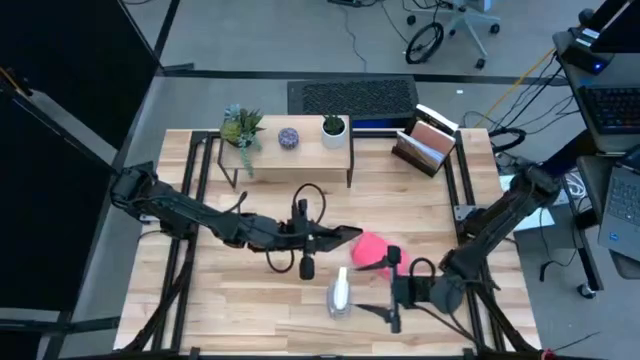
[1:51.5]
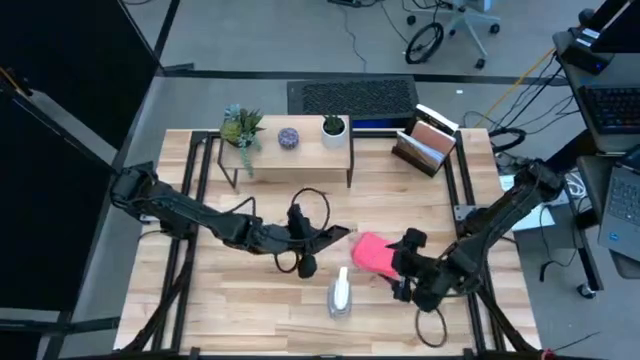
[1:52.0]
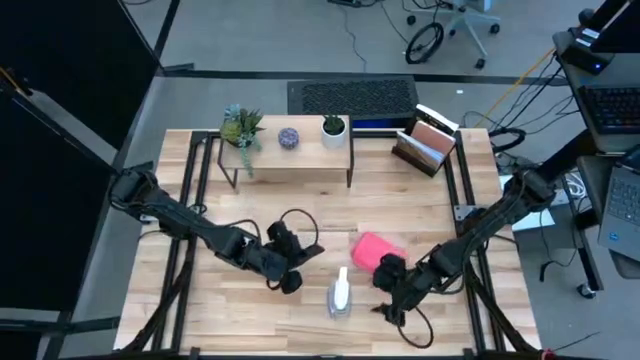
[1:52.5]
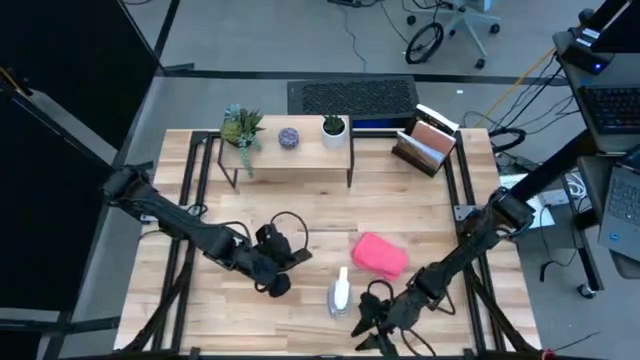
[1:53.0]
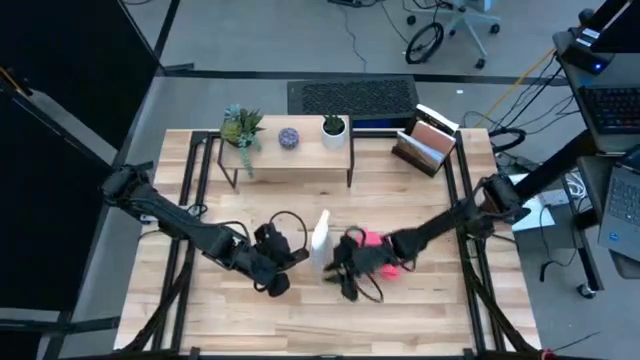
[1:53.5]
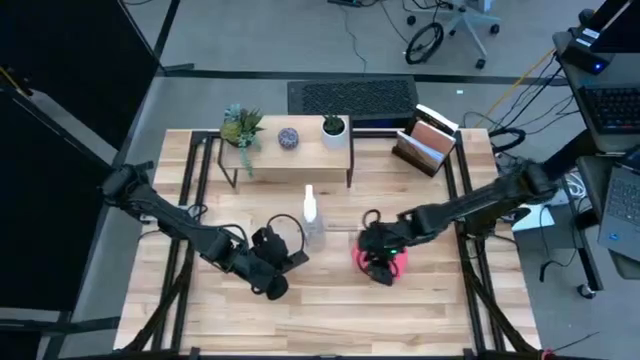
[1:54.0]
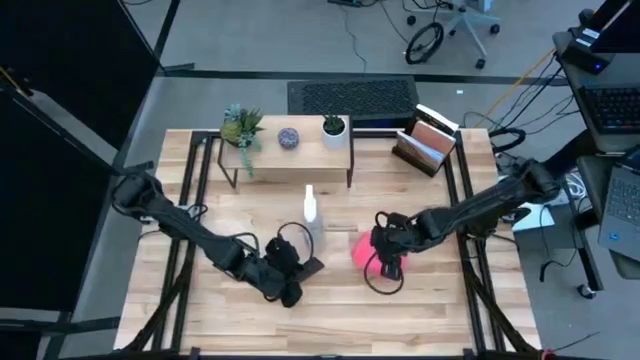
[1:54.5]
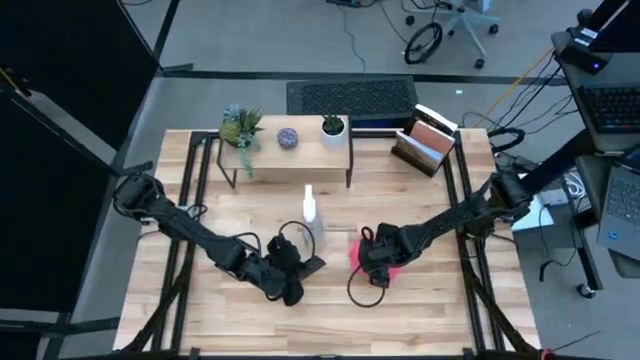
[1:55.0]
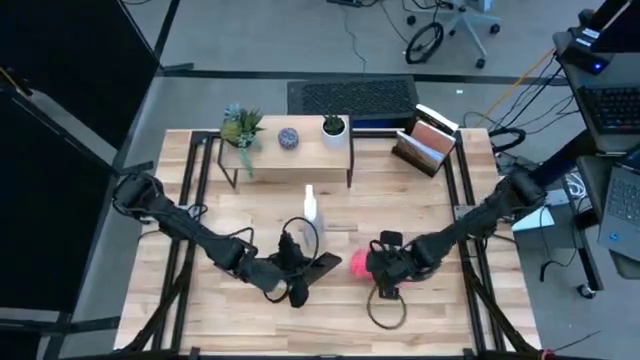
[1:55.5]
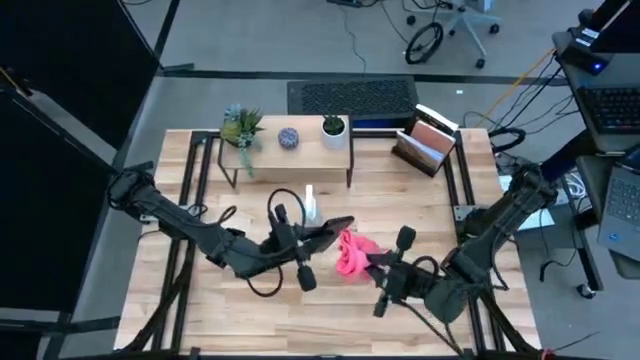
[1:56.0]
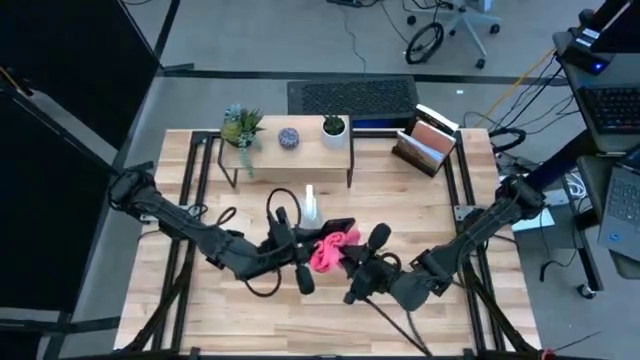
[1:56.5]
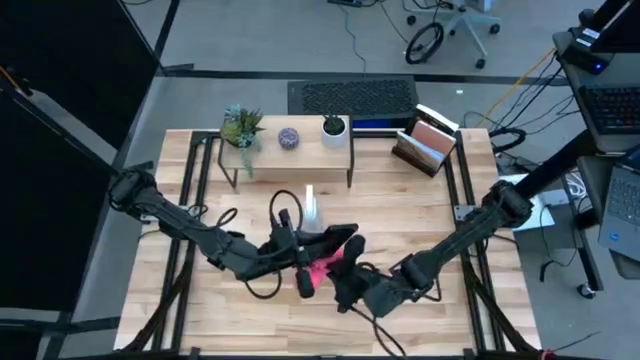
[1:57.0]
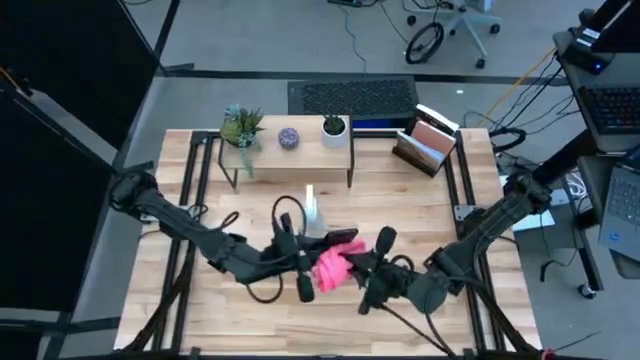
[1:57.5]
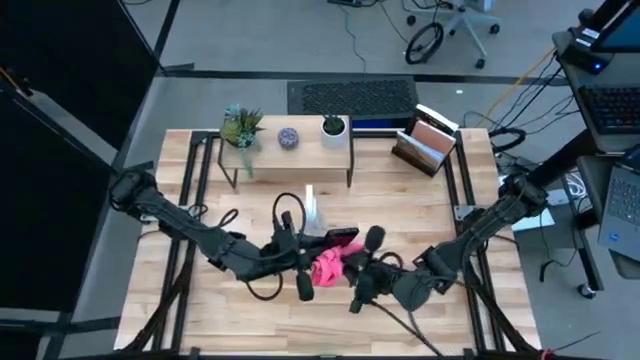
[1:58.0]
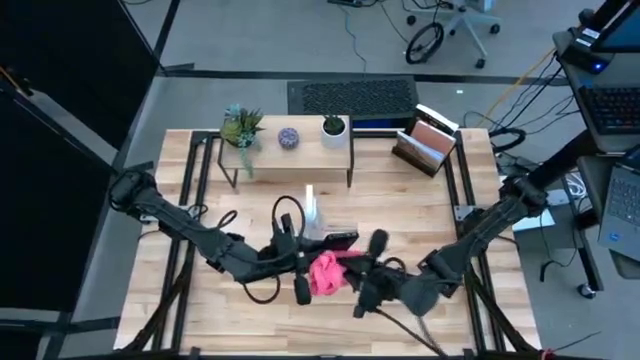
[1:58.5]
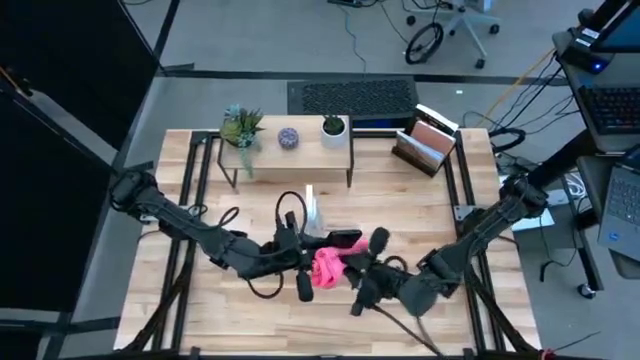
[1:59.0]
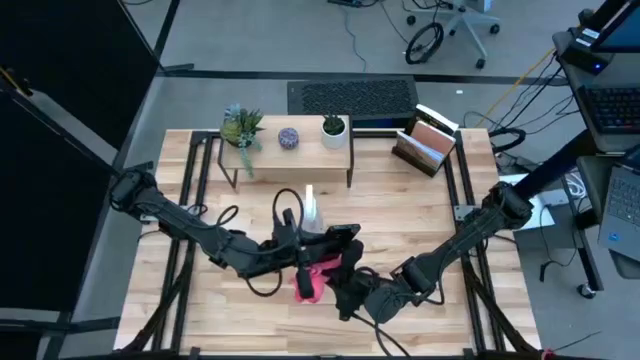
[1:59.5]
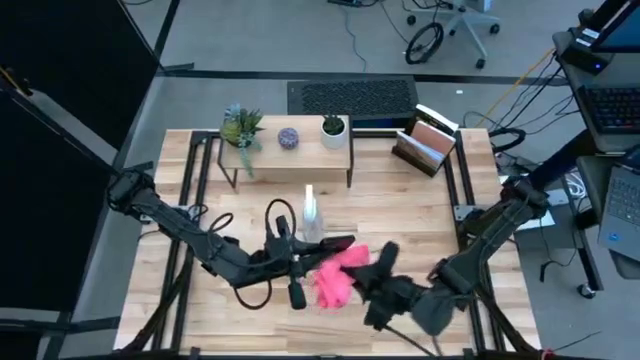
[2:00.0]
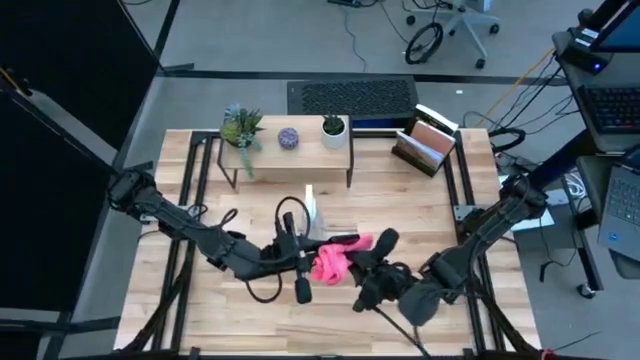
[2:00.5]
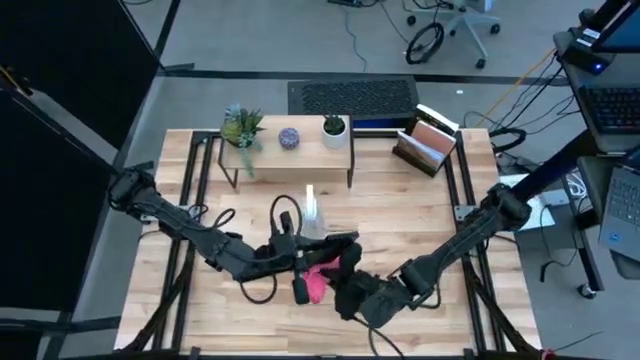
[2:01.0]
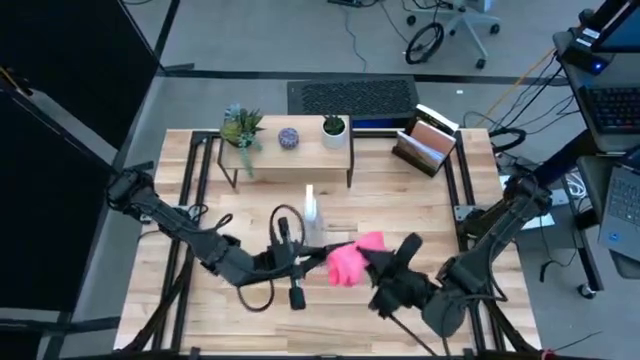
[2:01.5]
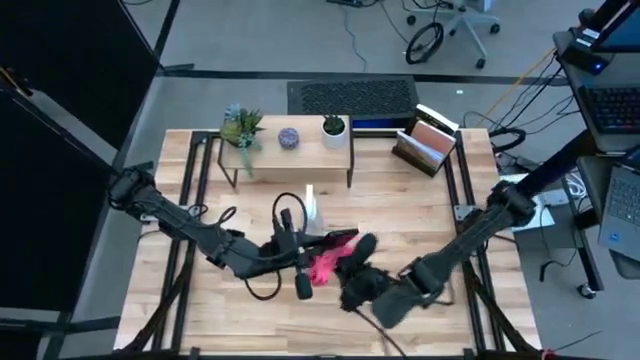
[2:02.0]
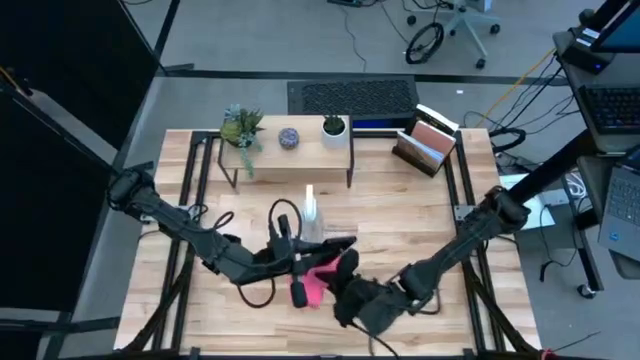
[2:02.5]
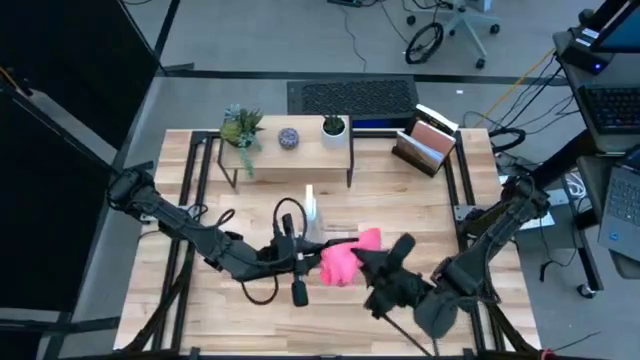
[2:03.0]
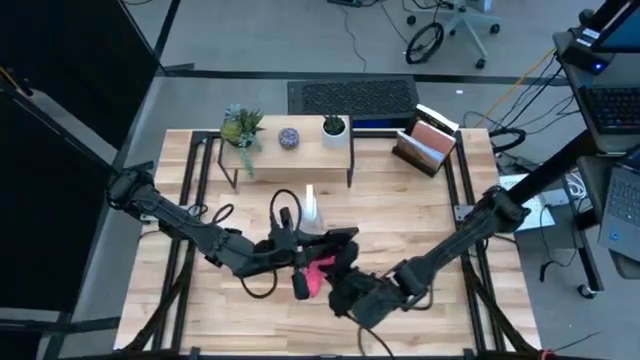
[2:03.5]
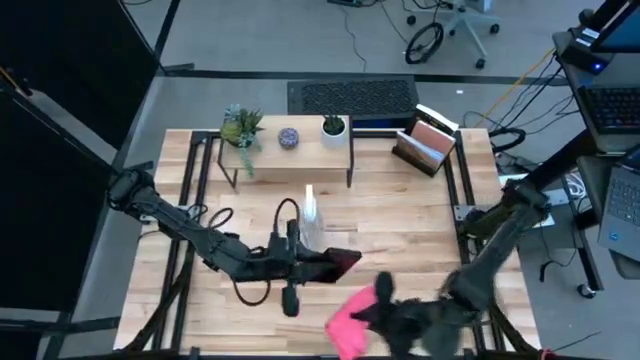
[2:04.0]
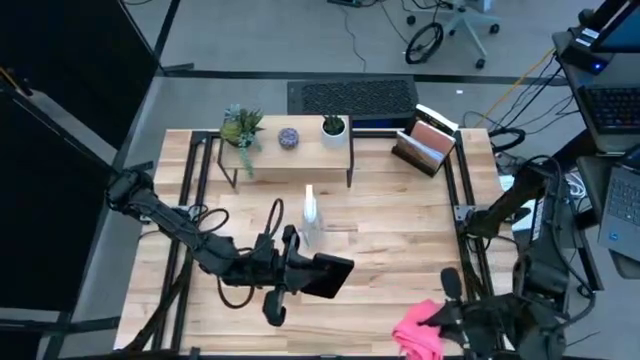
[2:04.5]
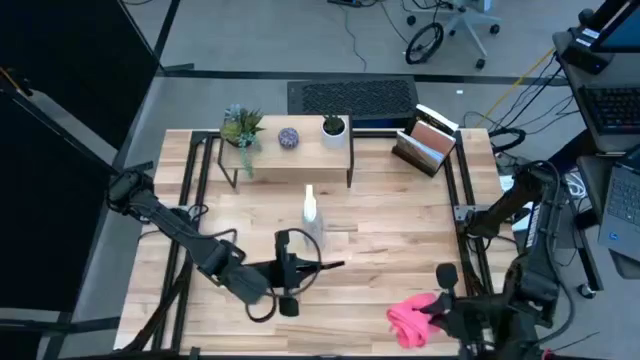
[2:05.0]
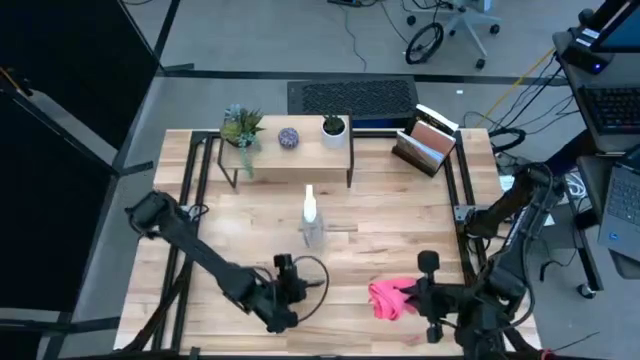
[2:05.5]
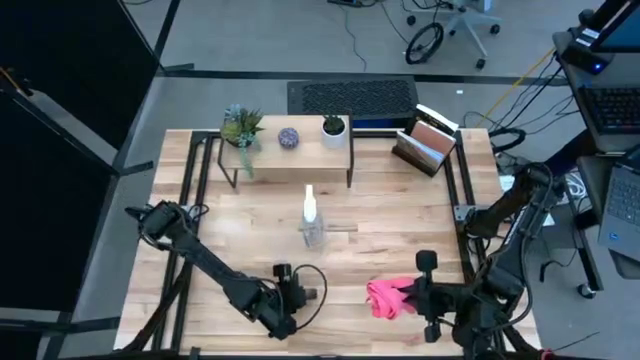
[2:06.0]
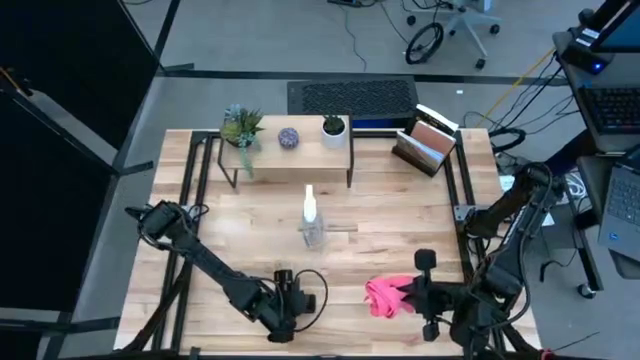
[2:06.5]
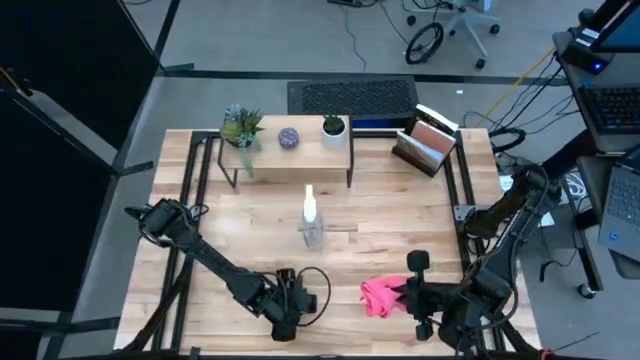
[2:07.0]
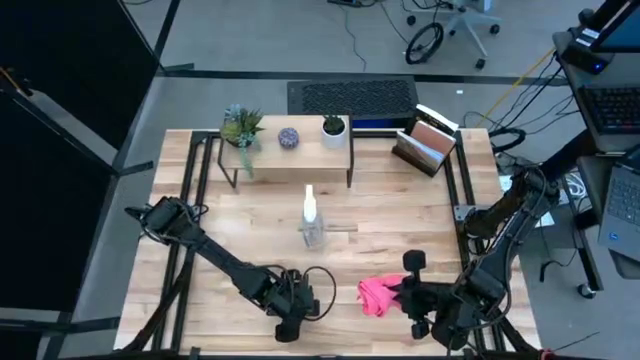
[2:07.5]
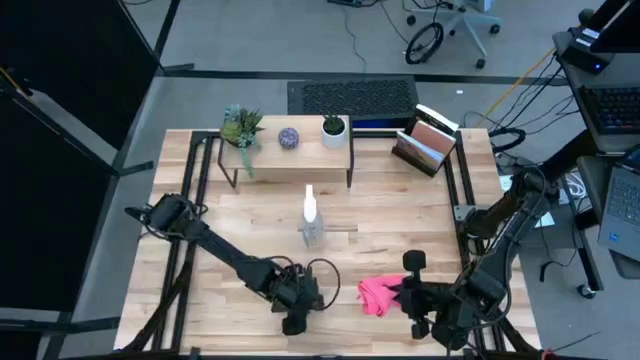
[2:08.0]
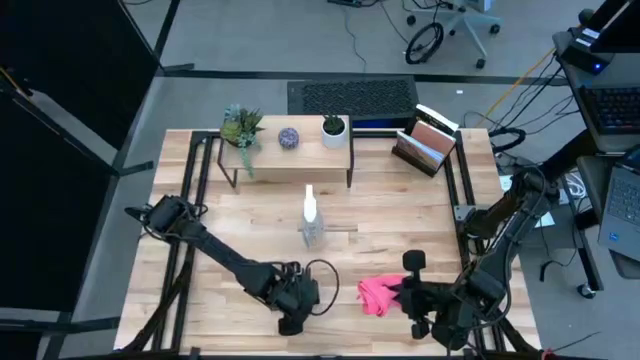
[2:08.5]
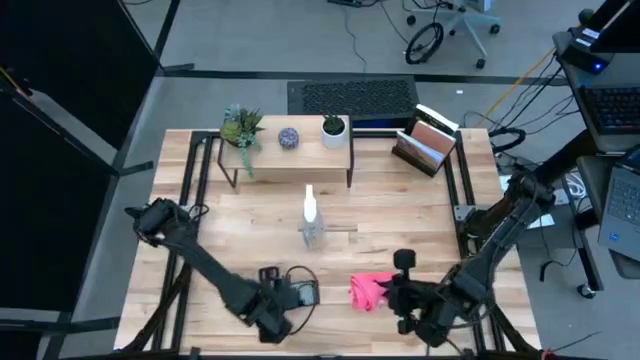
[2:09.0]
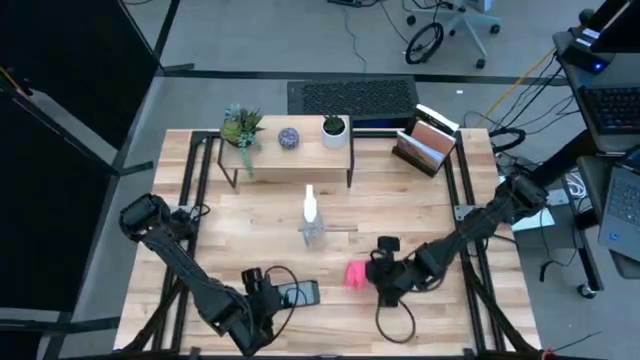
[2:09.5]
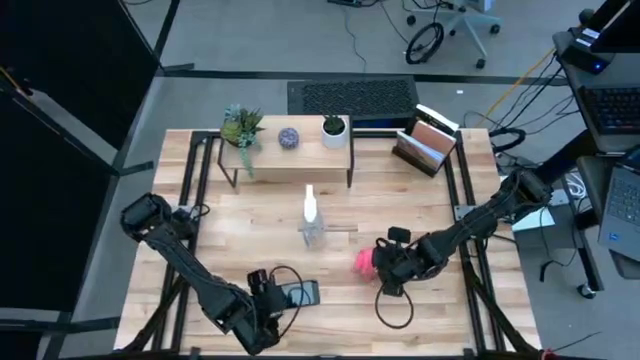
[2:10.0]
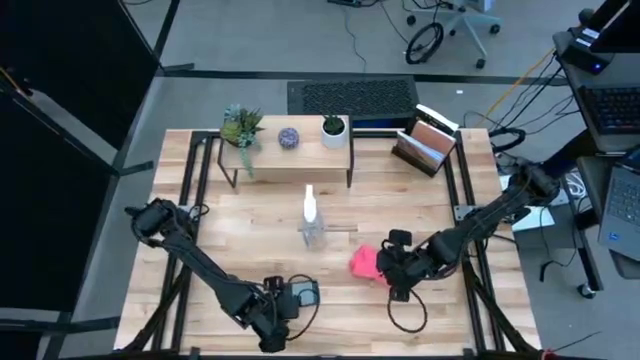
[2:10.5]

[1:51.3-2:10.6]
Task: Apply microfiber cloth
Wipe the back of the cellphone using the pink microfiber cloth

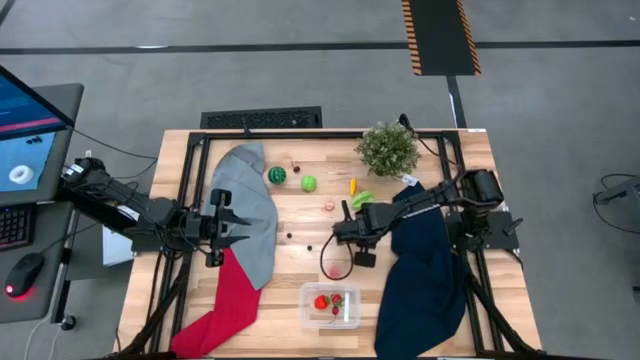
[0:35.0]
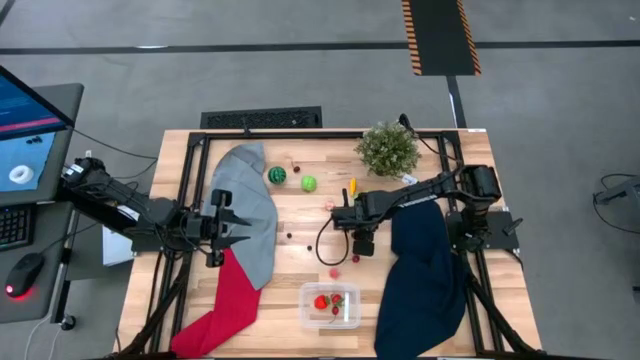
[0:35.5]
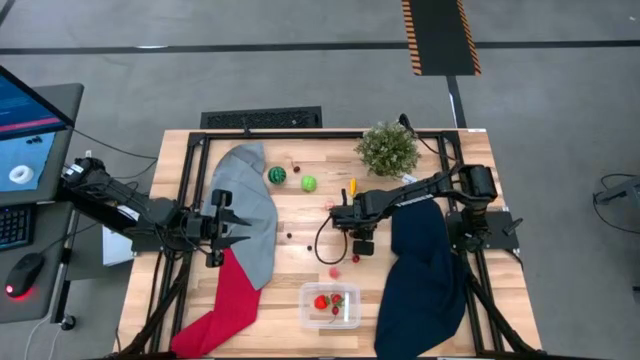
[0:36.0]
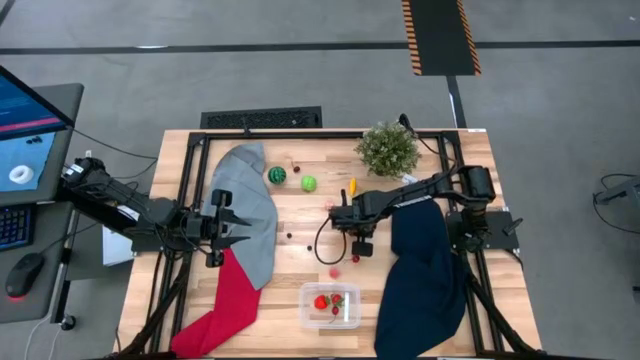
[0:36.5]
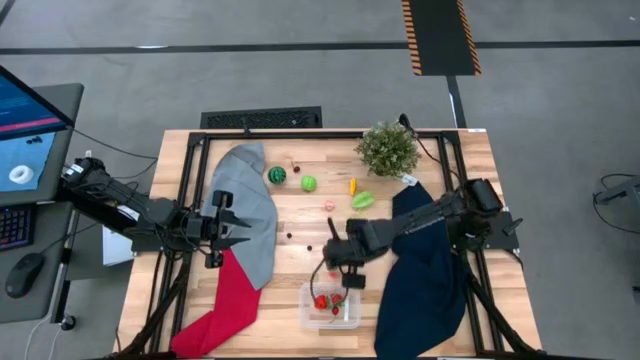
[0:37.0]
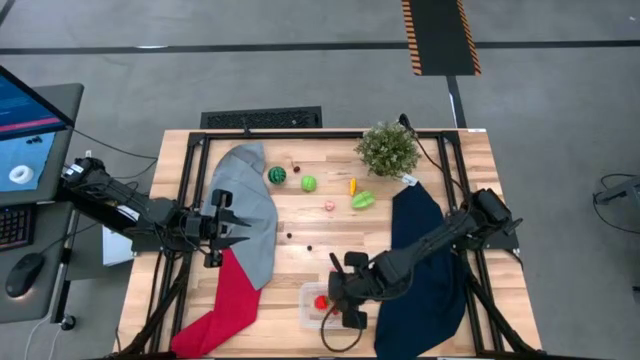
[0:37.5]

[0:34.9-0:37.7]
Task: Pick and placing Produce into tupperware
Put the cherry into the transparent bin
